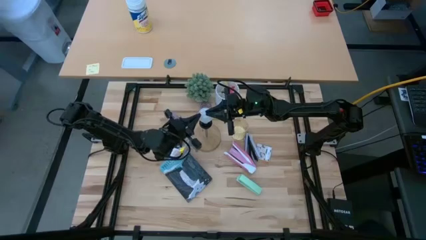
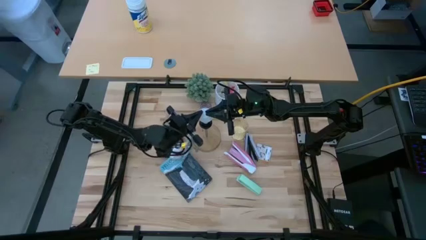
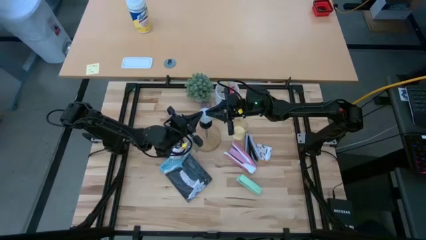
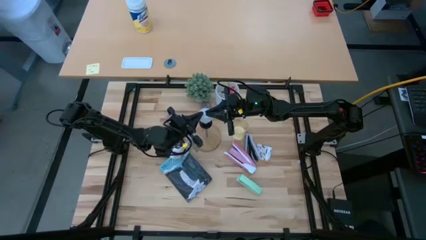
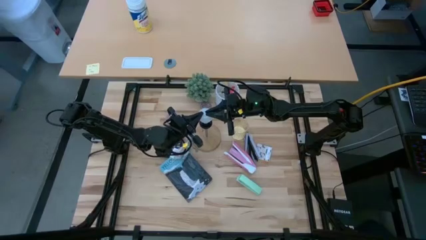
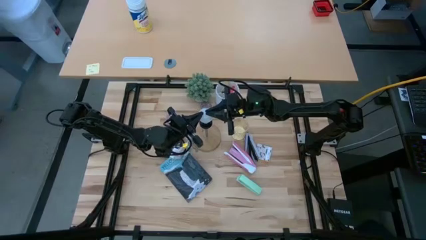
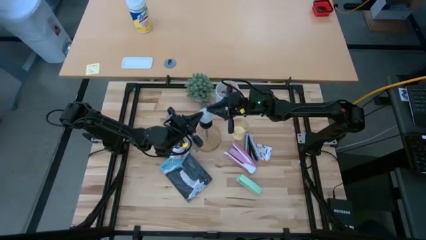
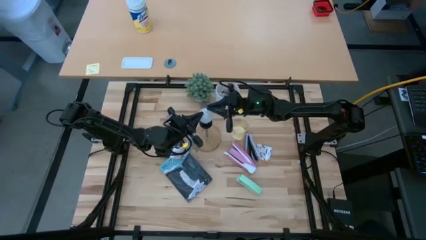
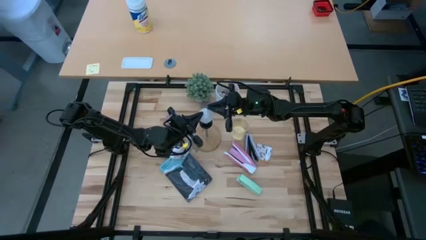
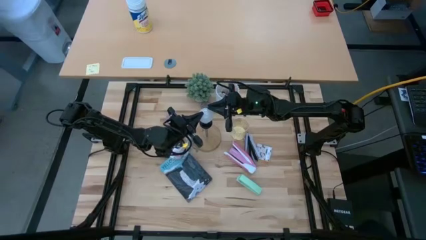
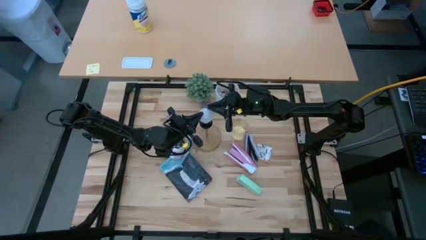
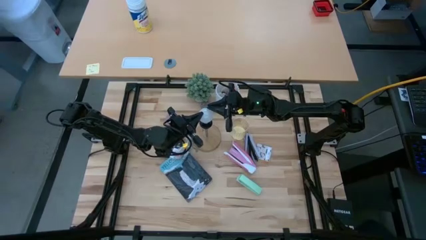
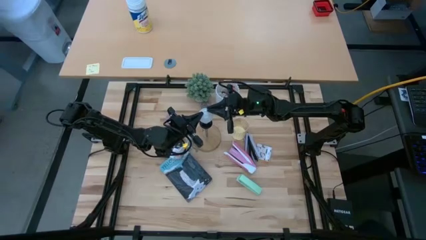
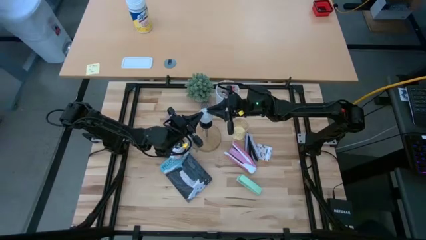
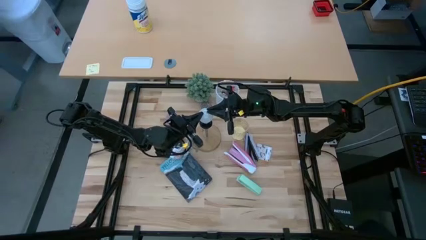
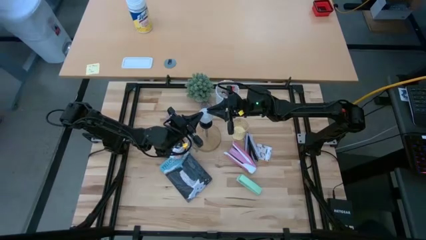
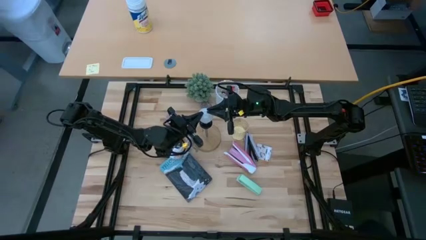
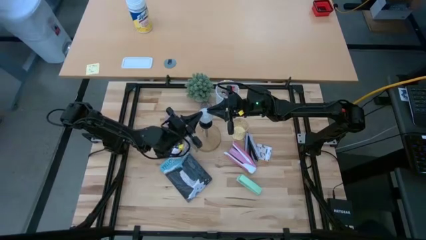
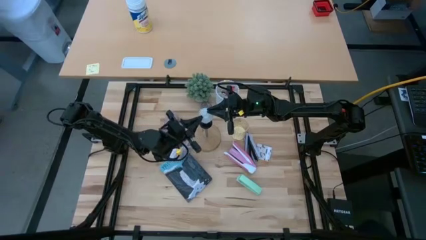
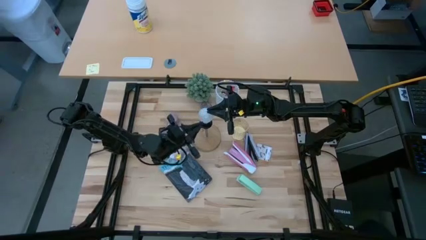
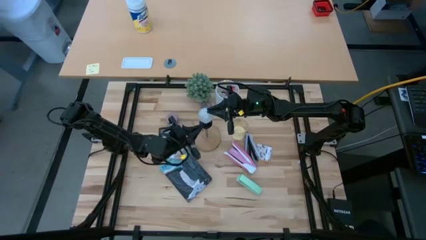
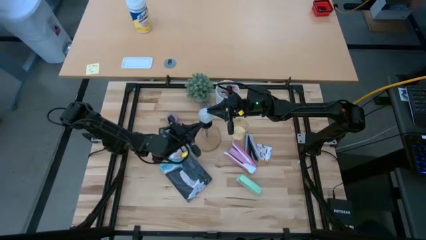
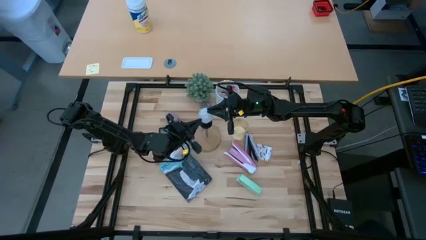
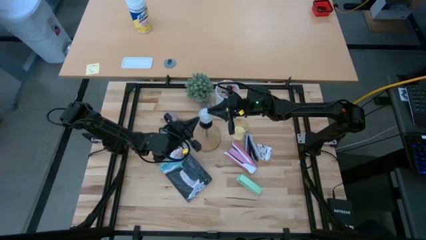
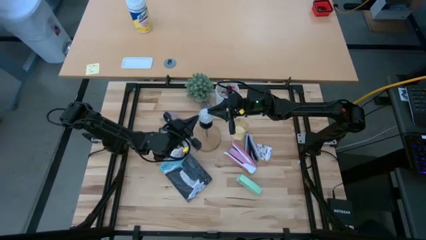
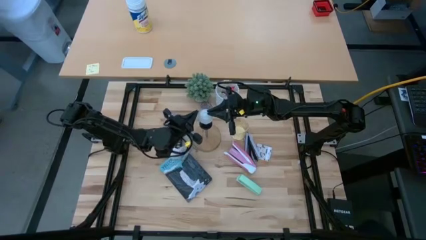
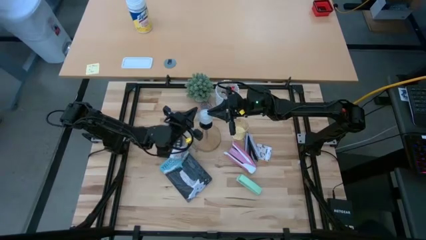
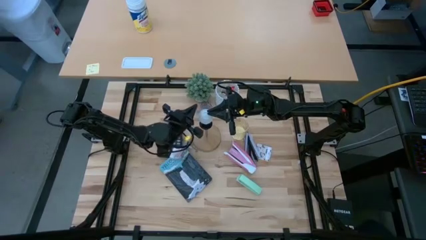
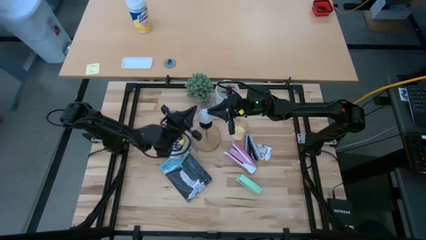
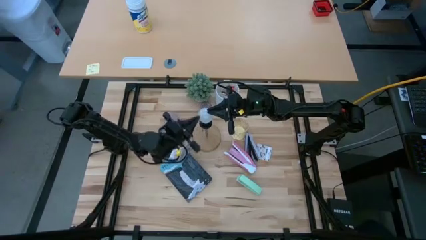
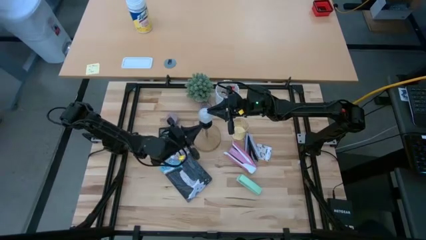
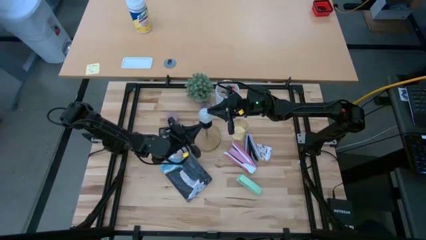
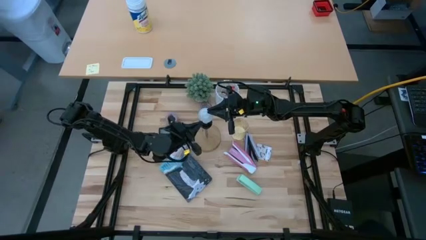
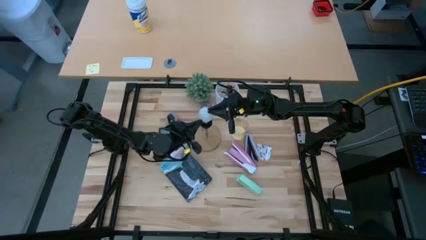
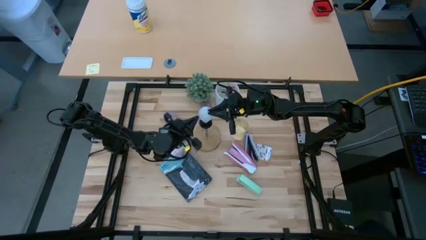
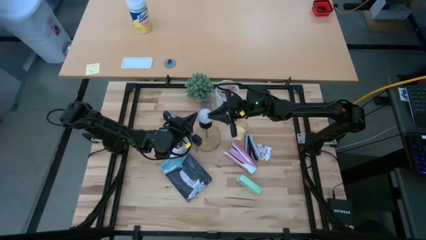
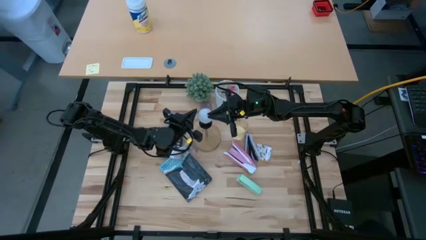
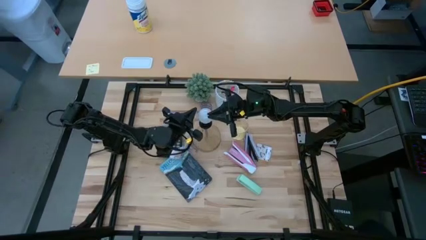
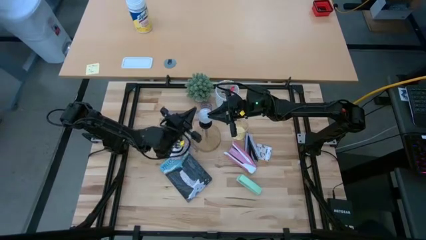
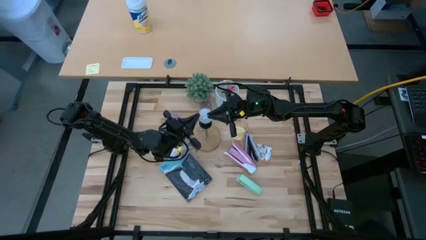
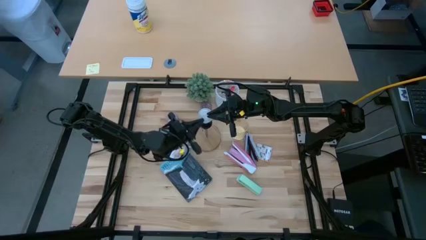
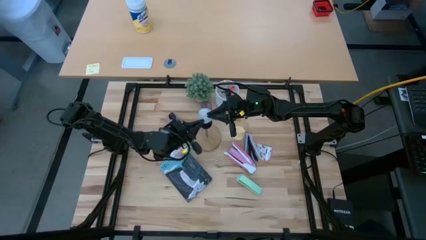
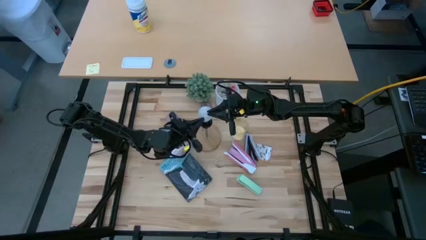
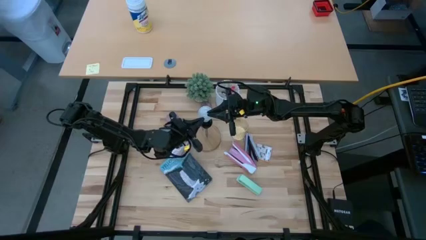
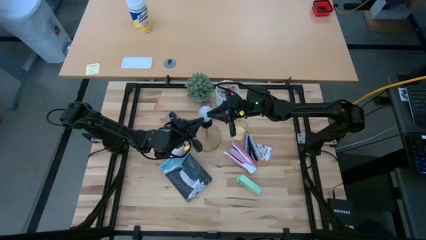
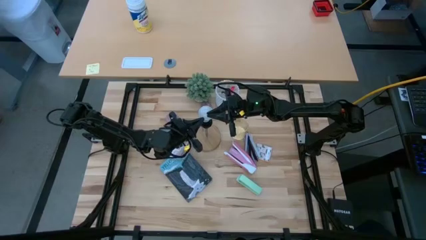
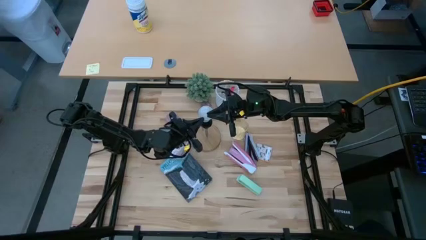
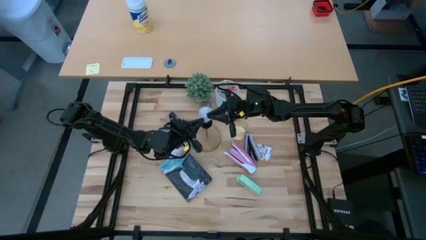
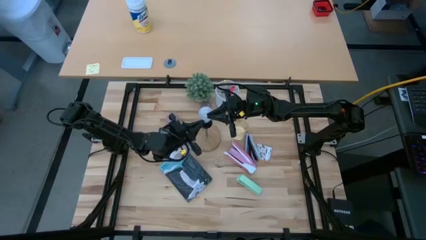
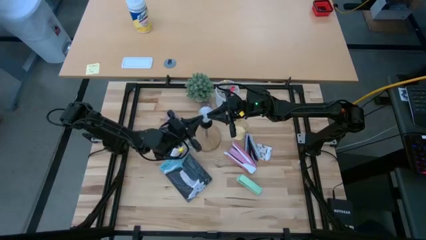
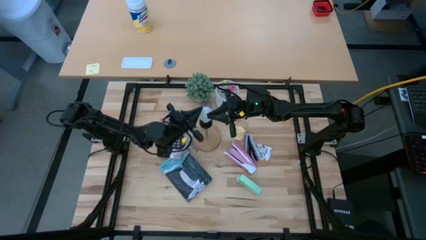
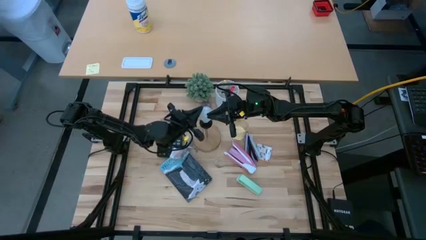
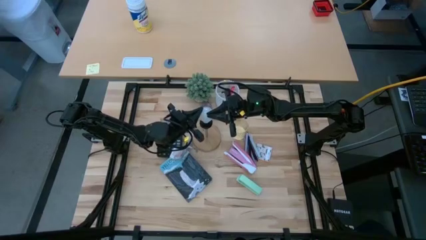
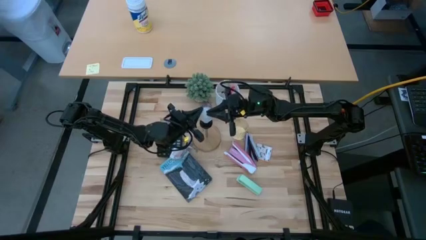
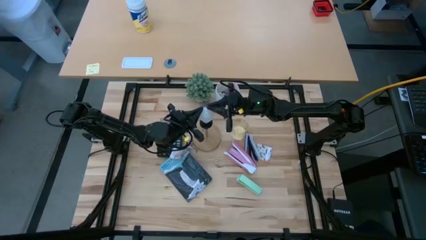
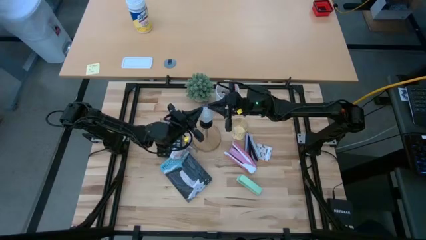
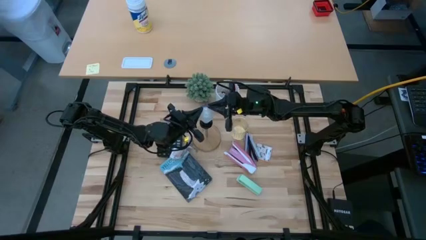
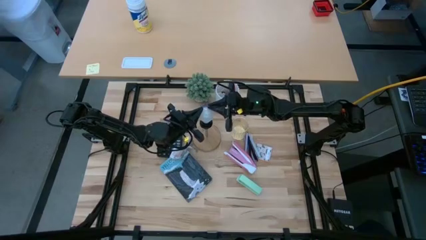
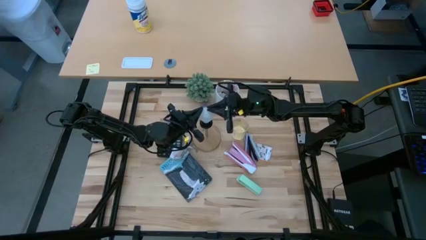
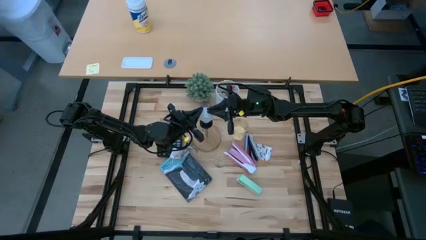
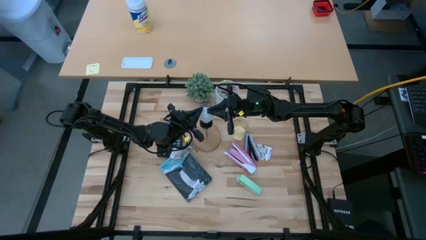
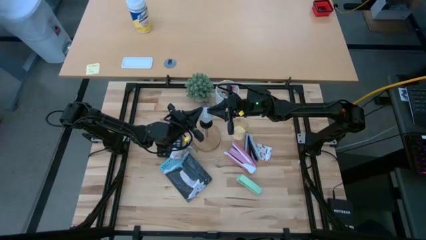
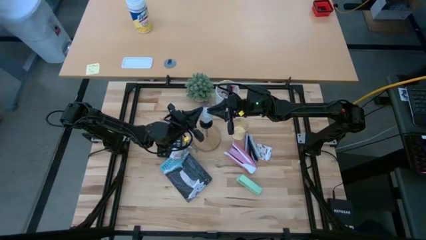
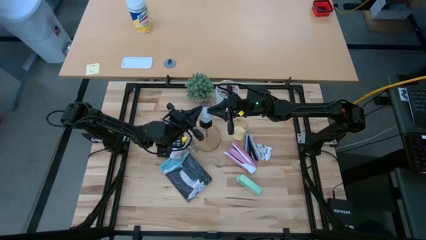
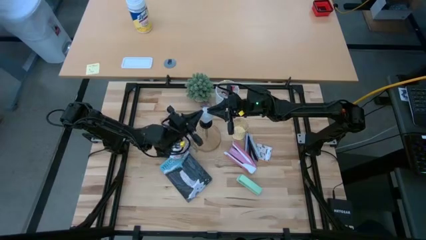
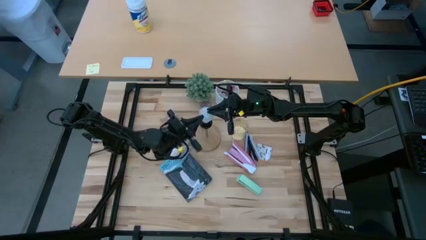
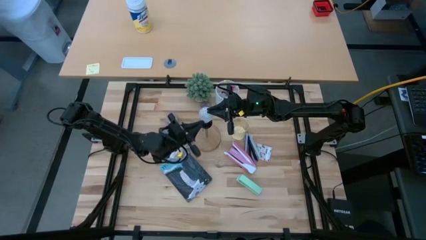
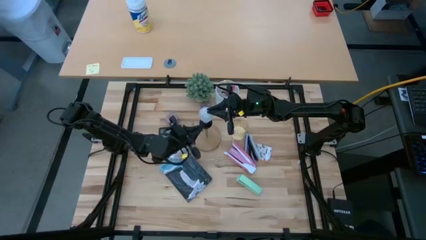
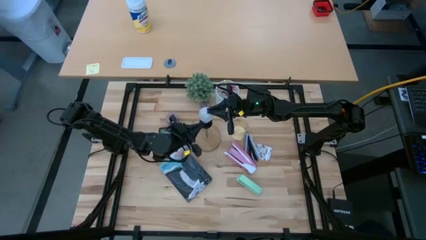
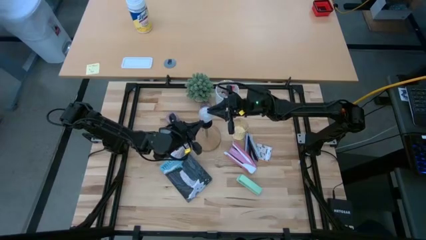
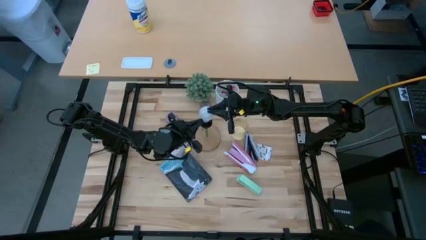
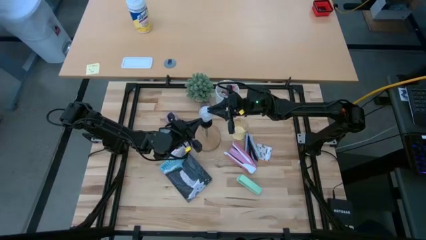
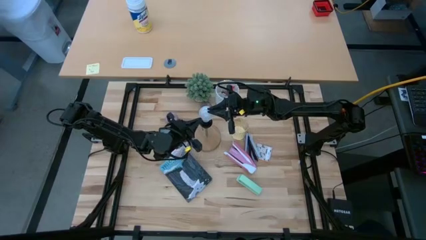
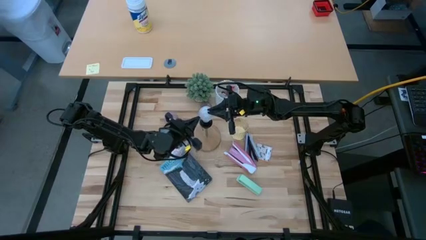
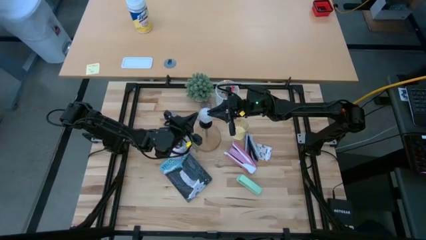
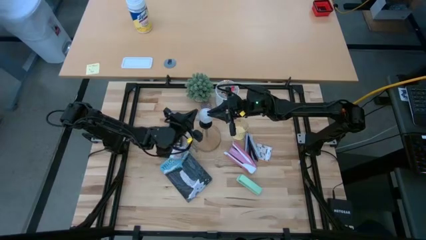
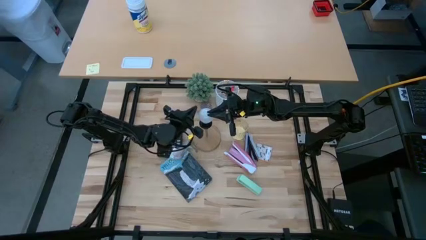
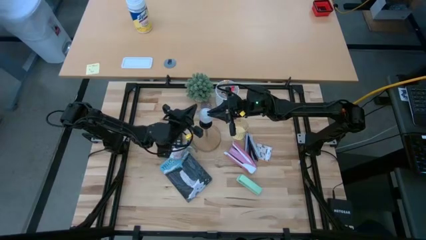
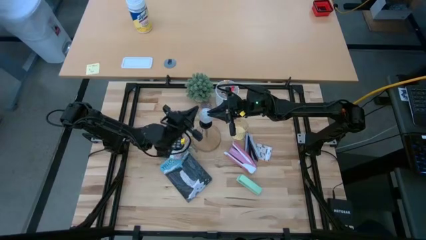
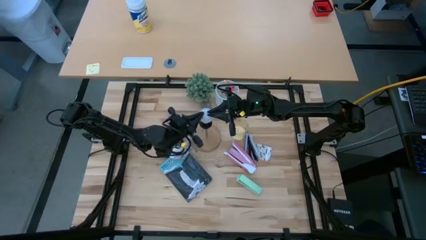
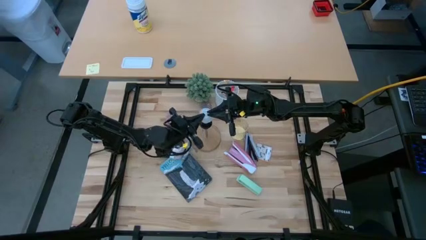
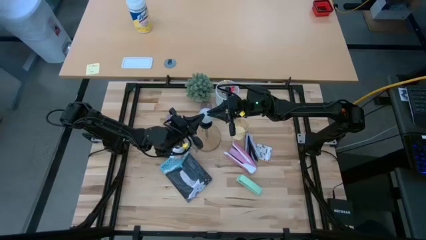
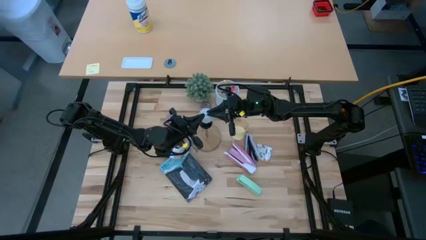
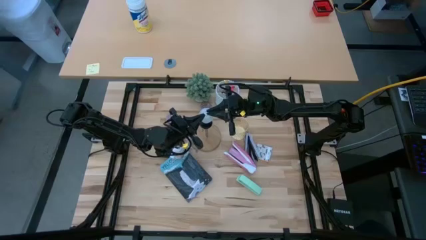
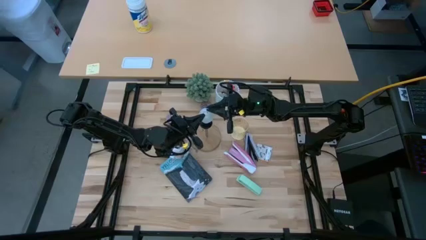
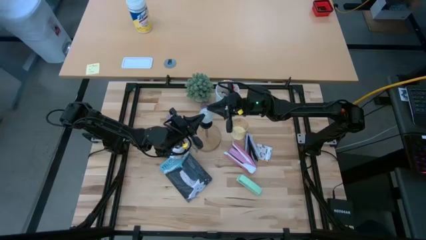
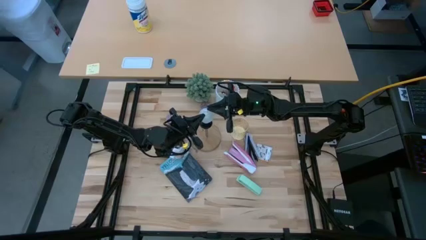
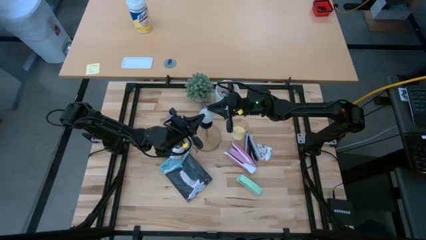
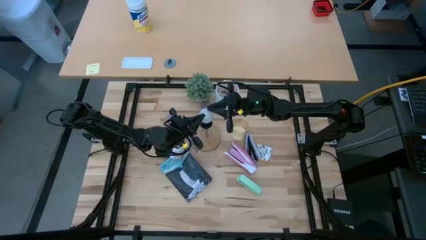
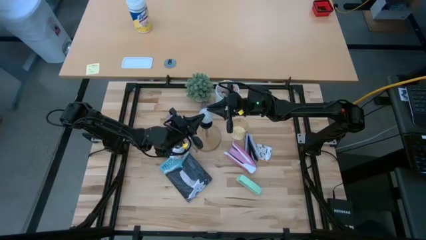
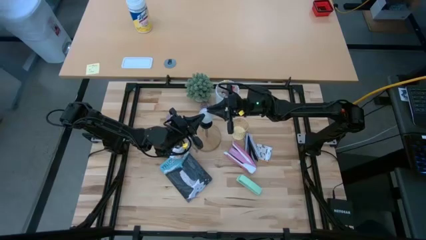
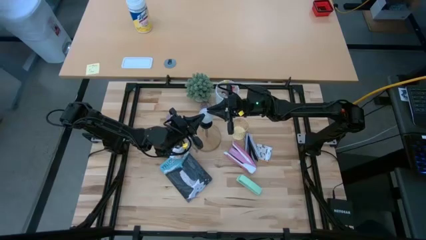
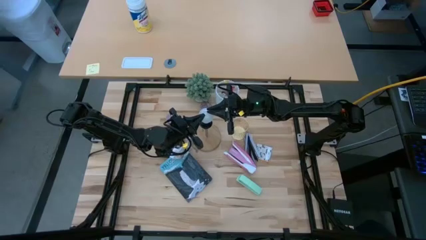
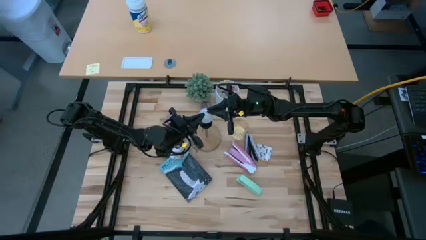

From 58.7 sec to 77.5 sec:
Task: Screw lightbulb
Insert the lightbulb into the lamp
